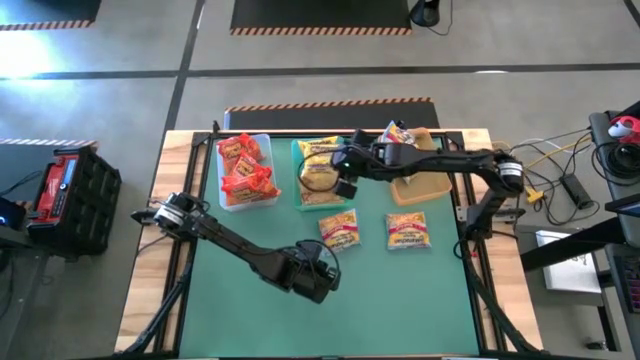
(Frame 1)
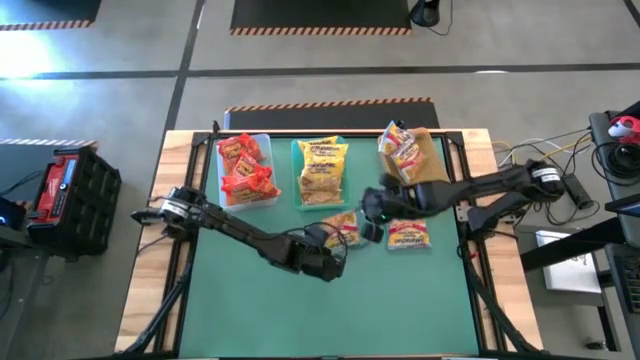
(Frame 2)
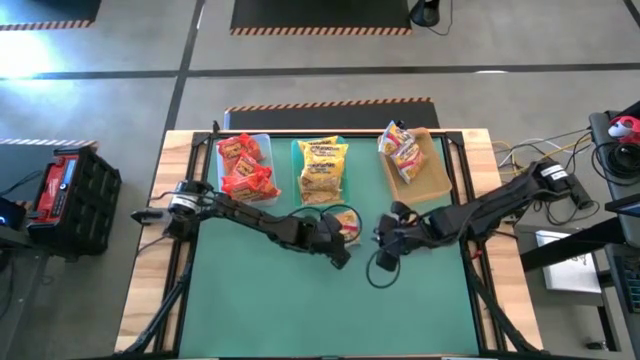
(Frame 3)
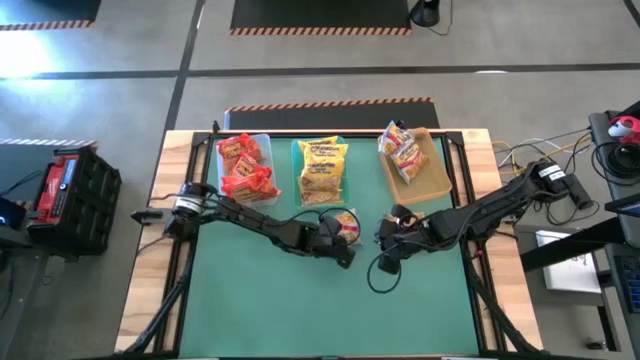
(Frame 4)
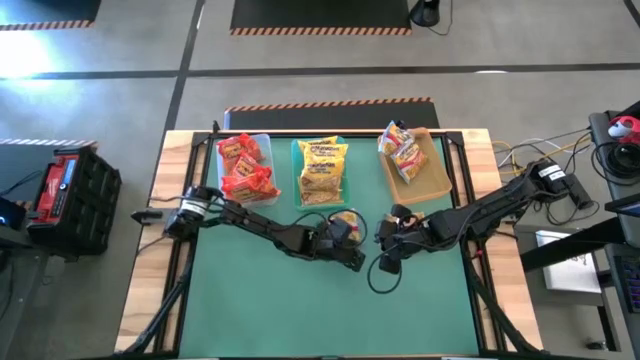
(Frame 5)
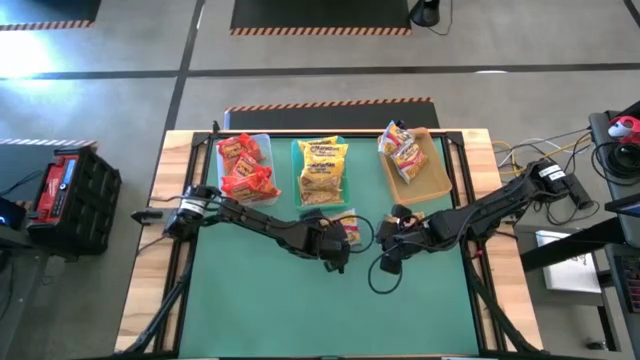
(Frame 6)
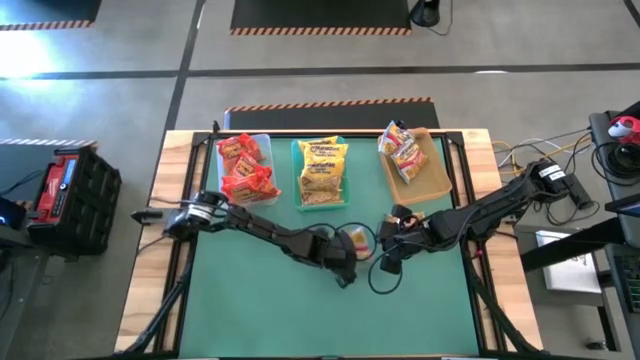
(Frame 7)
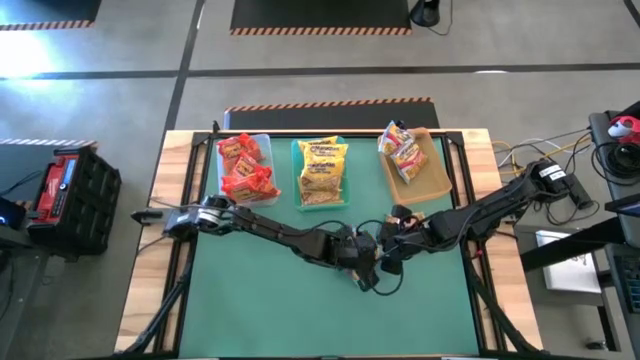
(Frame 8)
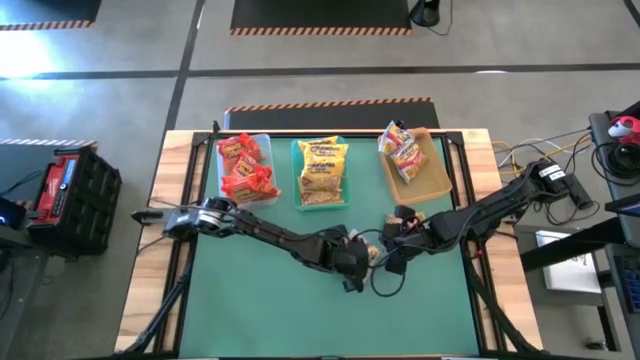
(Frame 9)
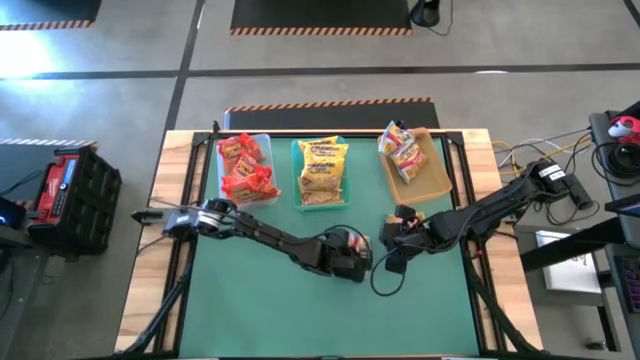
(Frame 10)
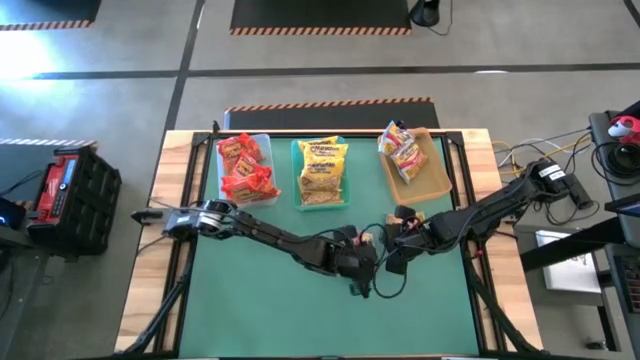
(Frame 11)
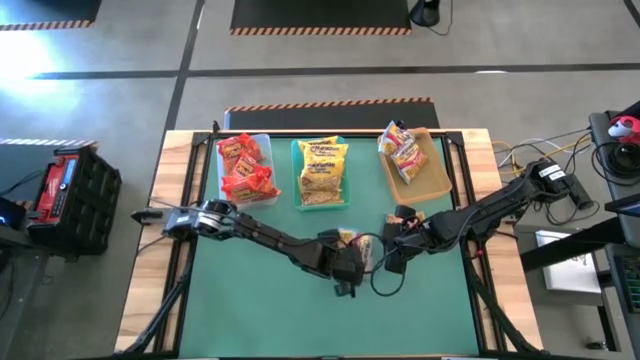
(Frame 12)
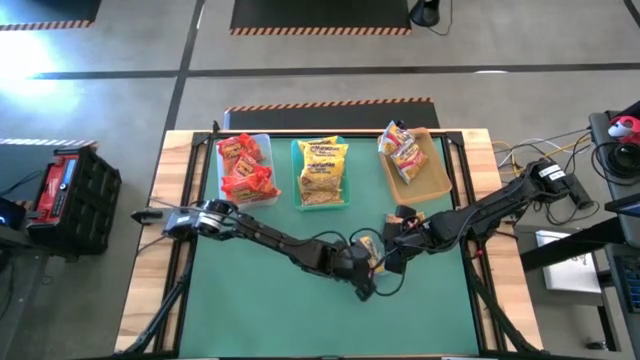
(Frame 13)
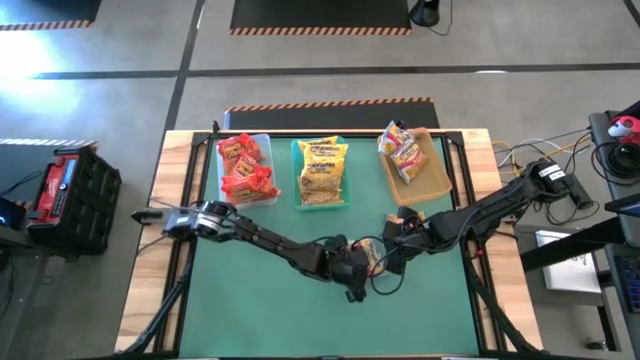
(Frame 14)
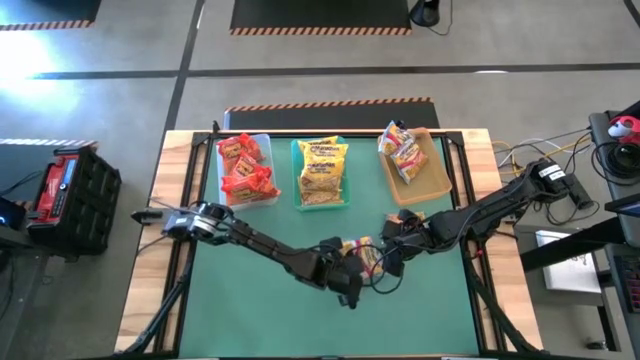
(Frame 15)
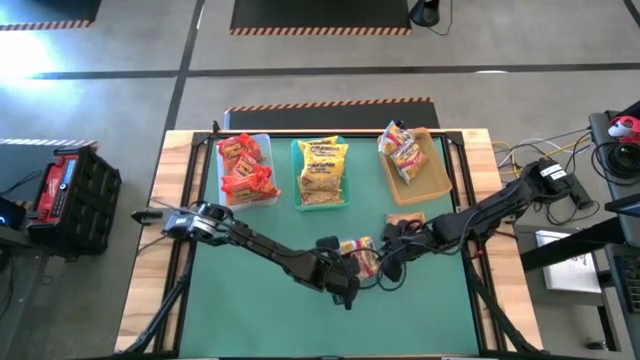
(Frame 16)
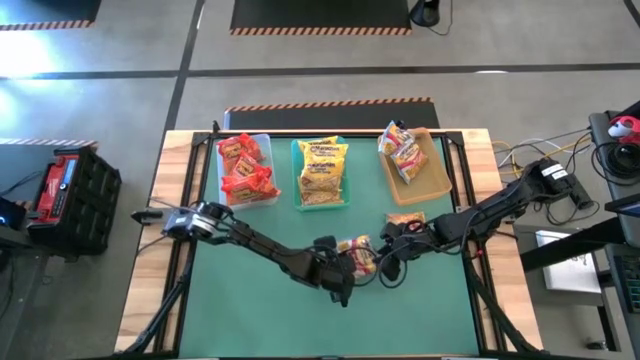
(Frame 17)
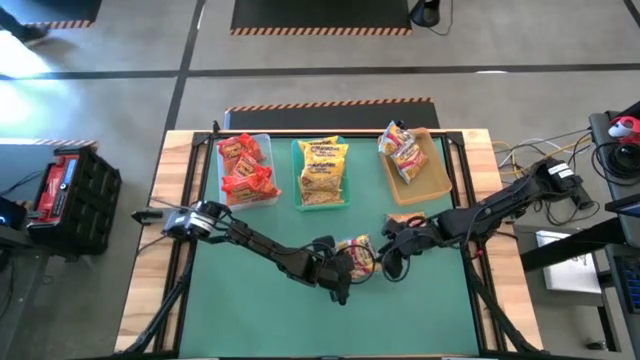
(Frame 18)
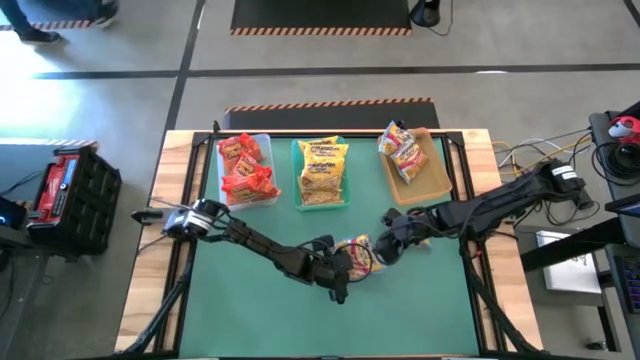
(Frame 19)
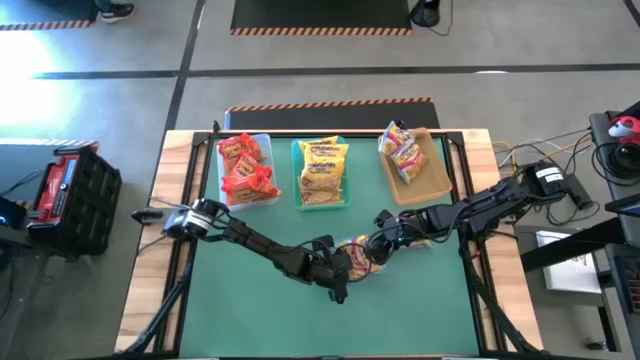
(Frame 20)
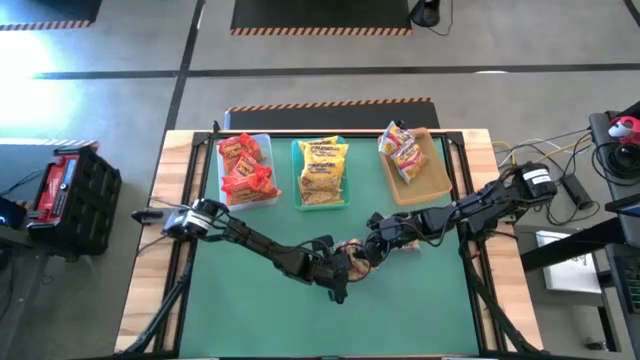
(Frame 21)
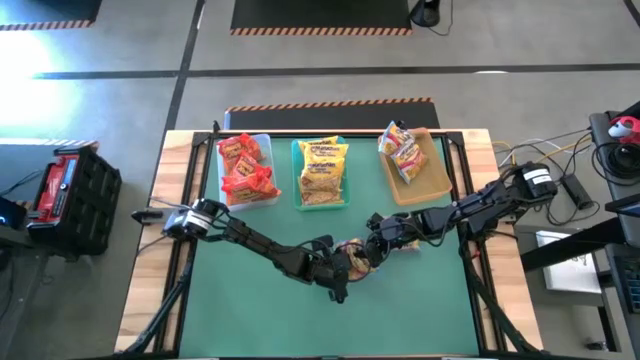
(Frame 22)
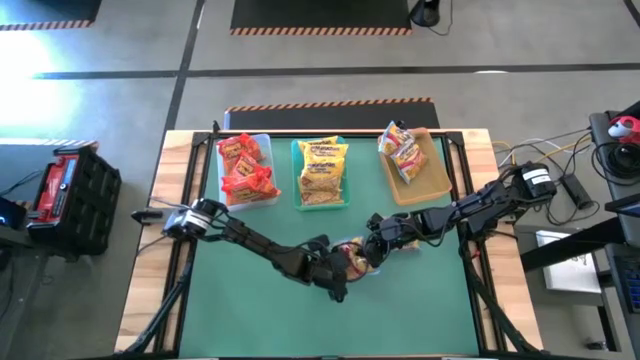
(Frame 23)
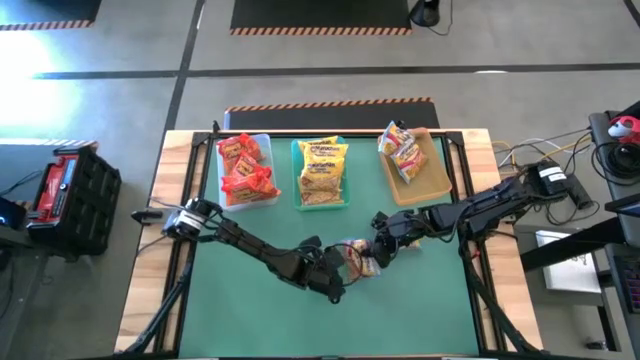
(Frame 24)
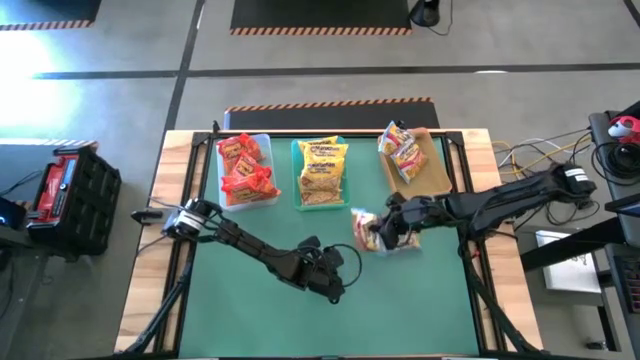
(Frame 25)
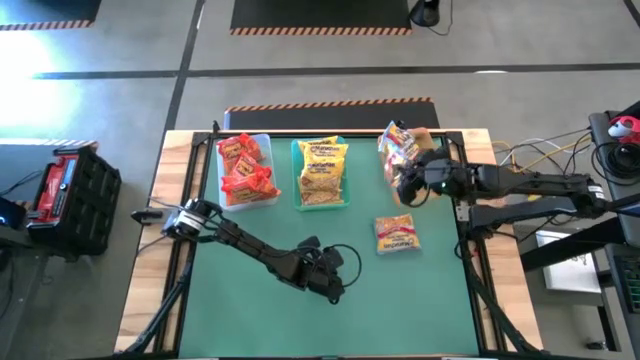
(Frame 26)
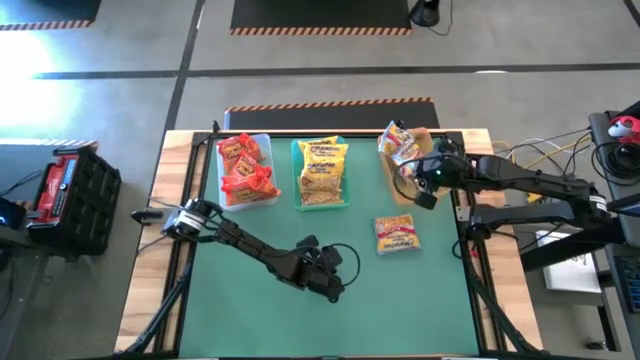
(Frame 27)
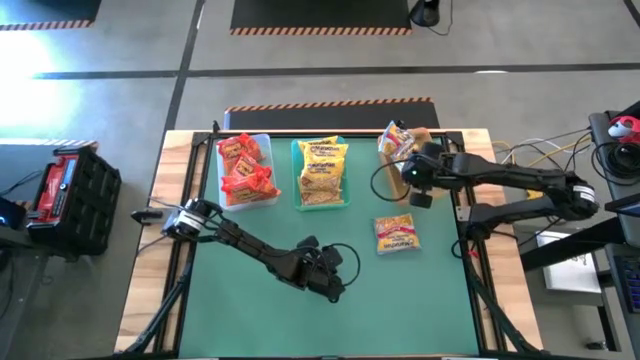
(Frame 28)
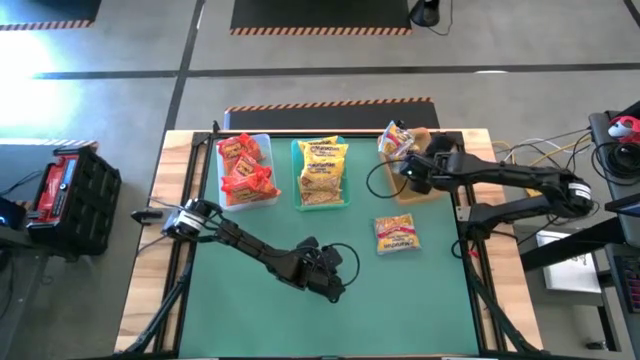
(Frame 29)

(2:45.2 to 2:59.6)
Task: Sort Maruchan noodles
Put the blue noodle pack into the orange bin

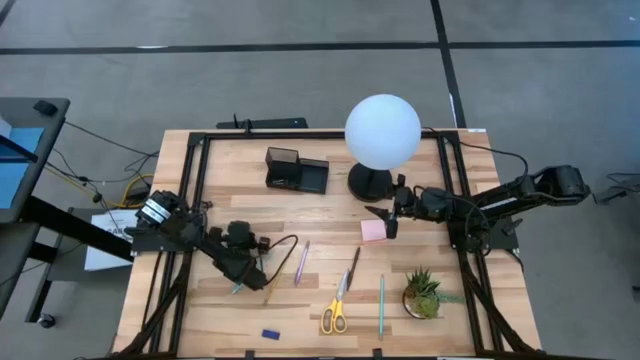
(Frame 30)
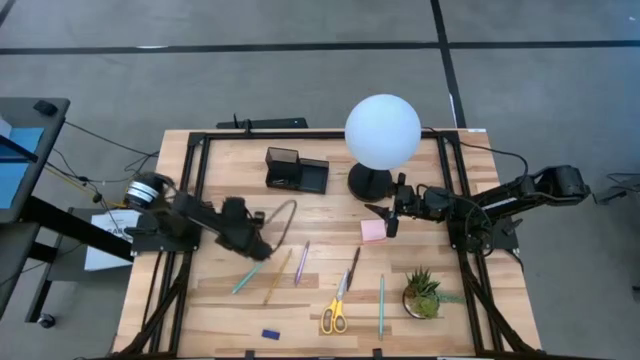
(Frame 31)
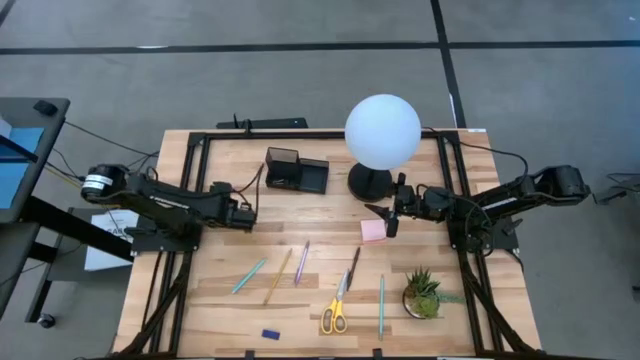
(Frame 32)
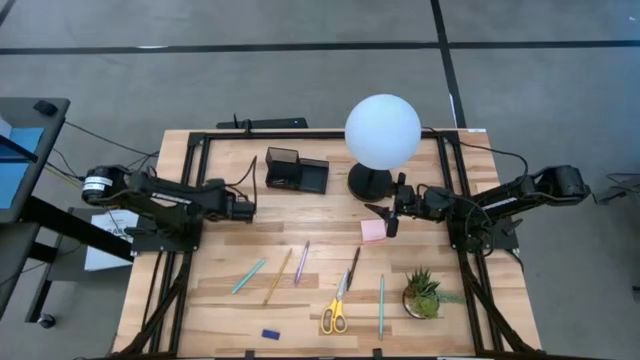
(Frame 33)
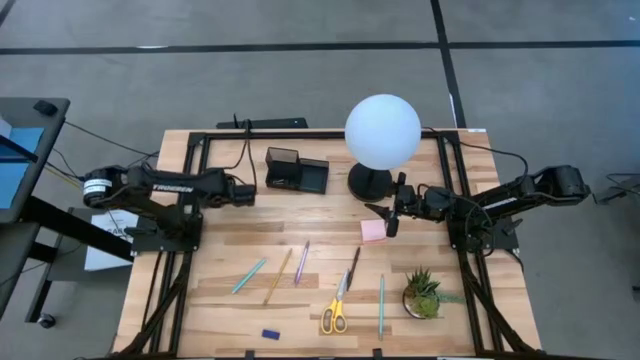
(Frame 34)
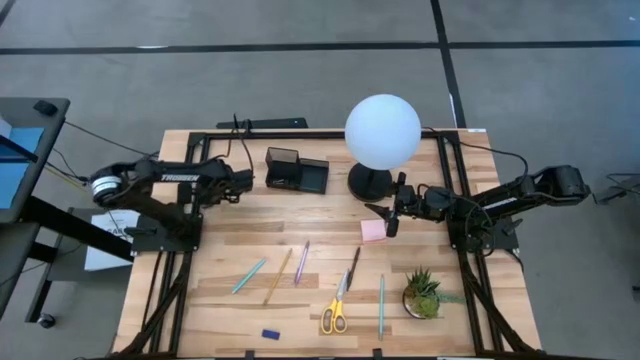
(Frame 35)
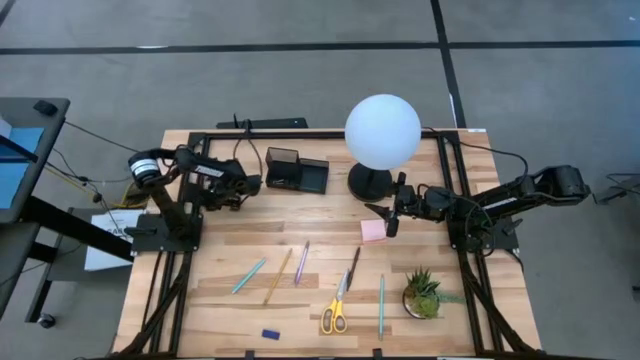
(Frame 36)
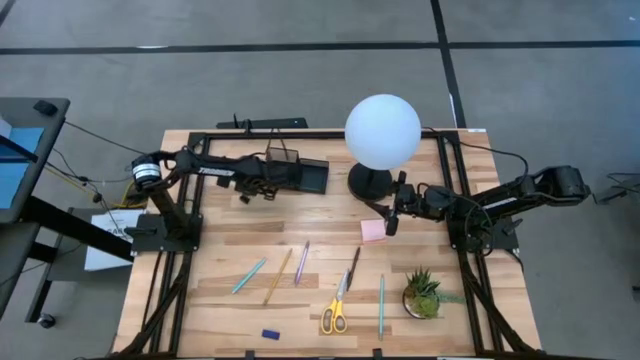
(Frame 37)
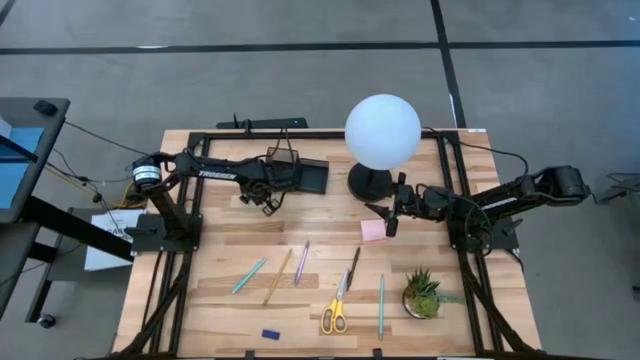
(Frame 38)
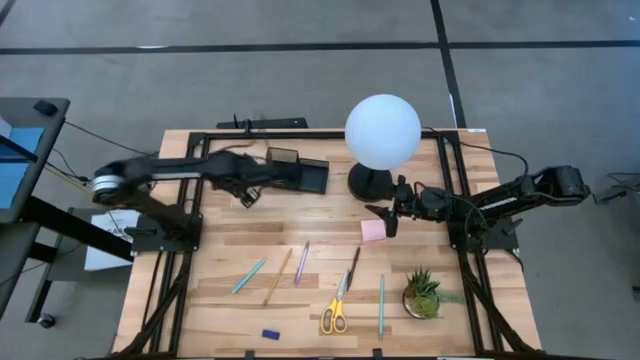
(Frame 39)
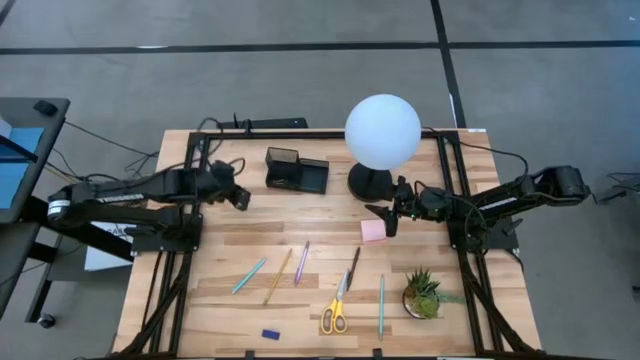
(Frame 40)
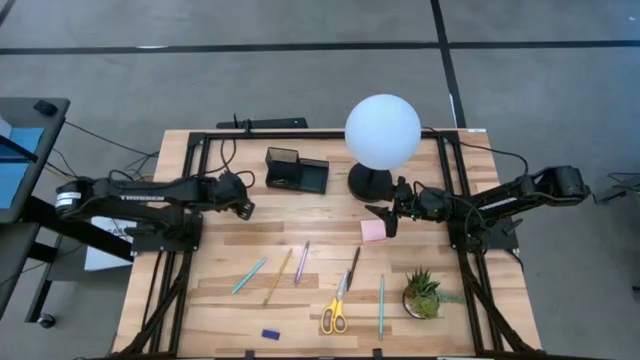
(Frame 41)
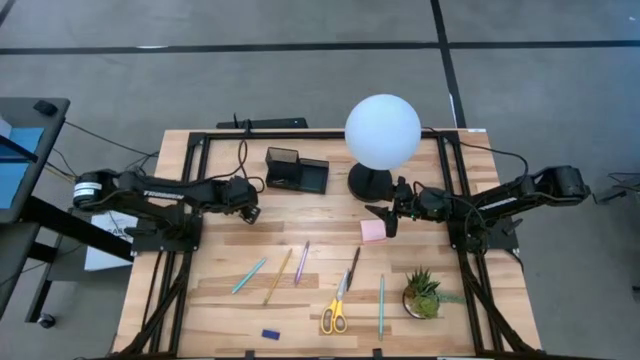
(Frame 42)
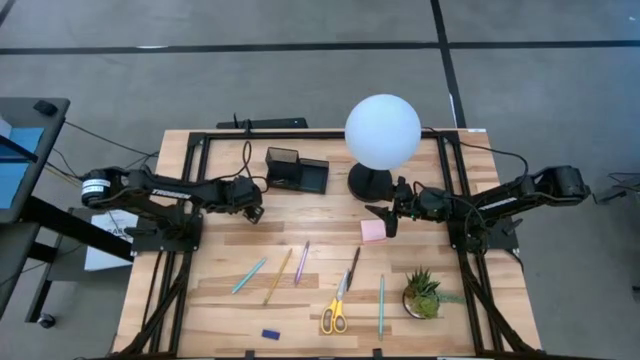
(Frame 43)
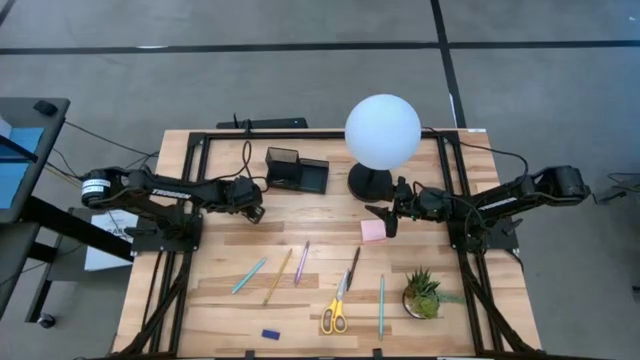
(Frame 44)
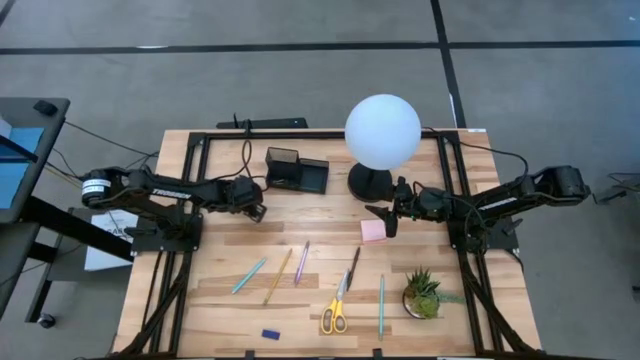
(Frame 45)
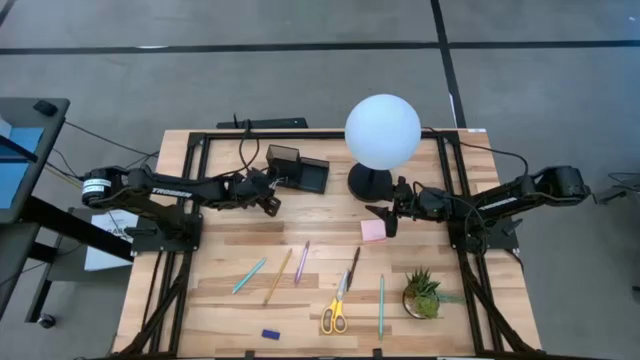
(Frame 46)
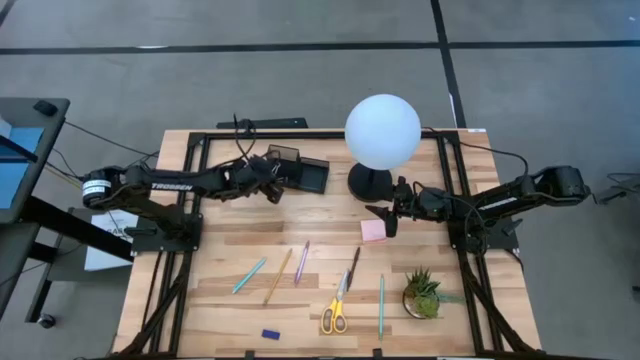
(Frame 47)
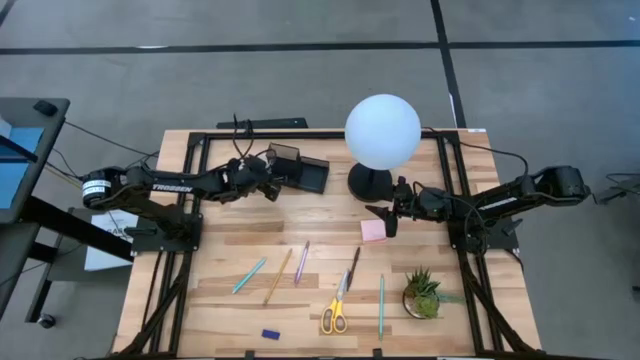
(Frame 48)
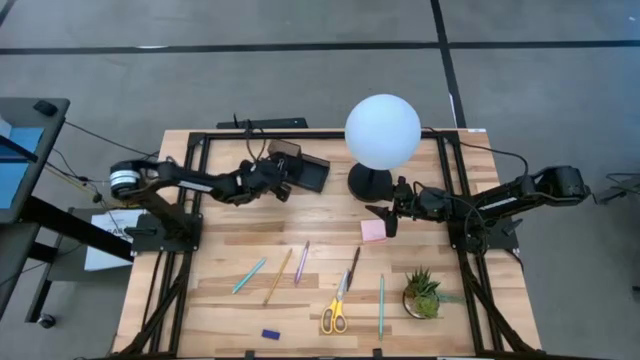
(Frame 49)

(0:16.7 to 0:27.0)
Task: Pick and place office supplies into organizer
Put the black binder clip into the black desk organizer
